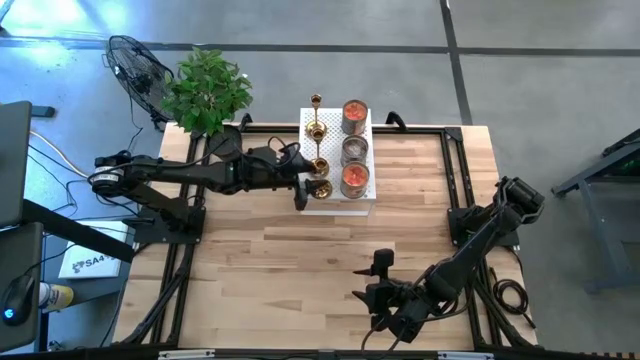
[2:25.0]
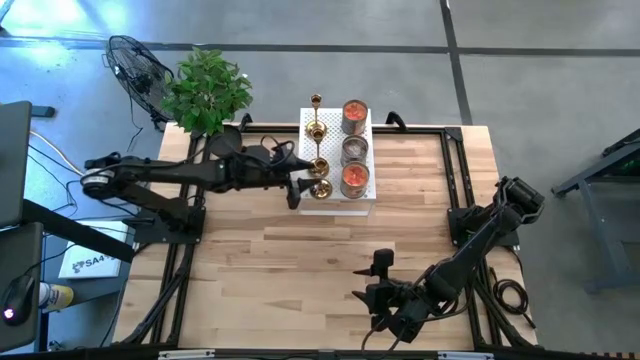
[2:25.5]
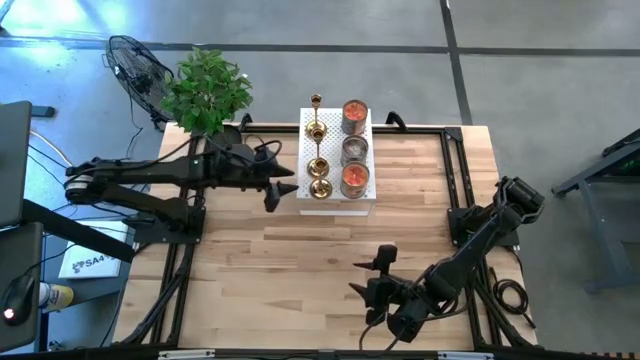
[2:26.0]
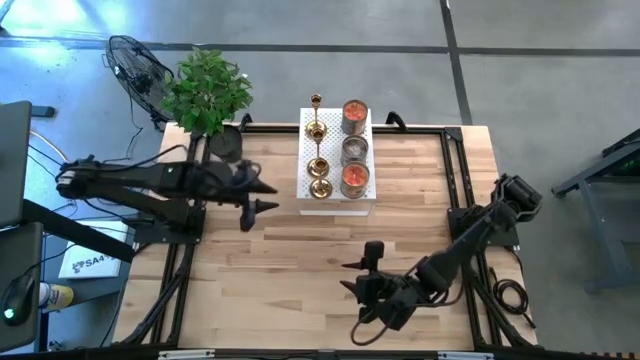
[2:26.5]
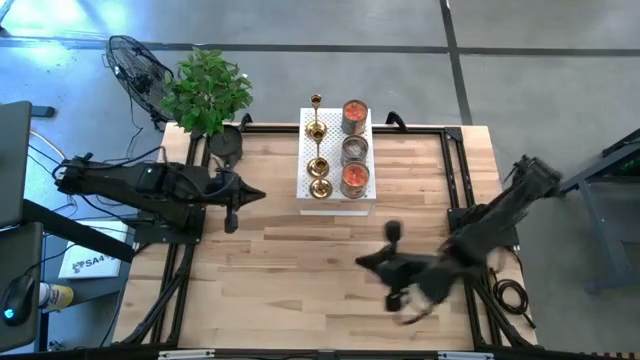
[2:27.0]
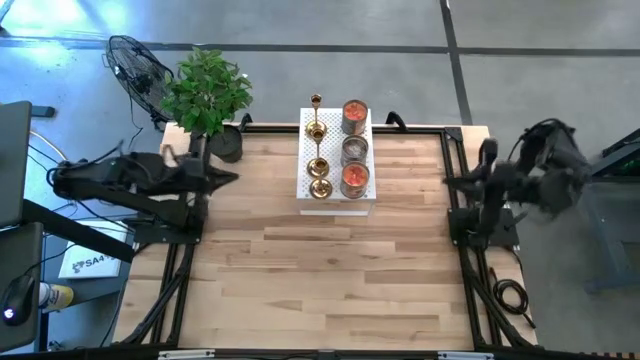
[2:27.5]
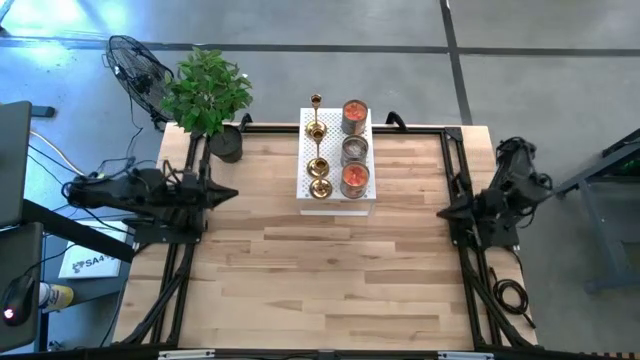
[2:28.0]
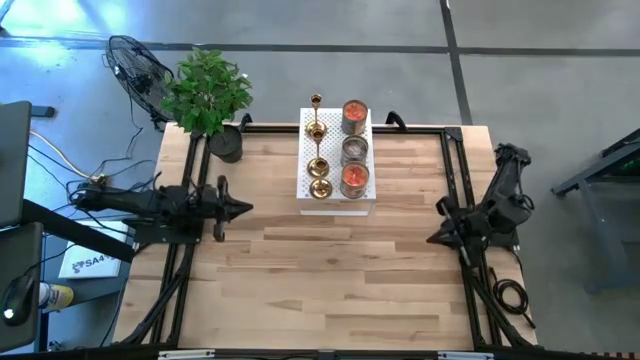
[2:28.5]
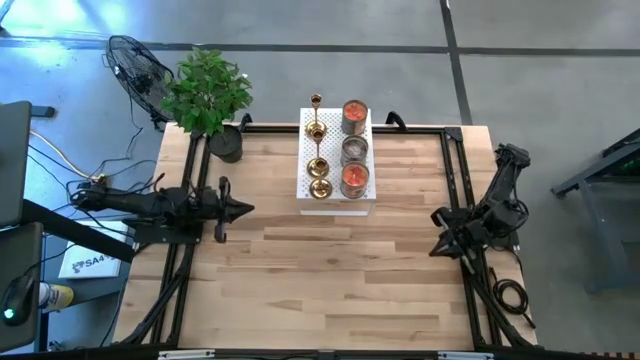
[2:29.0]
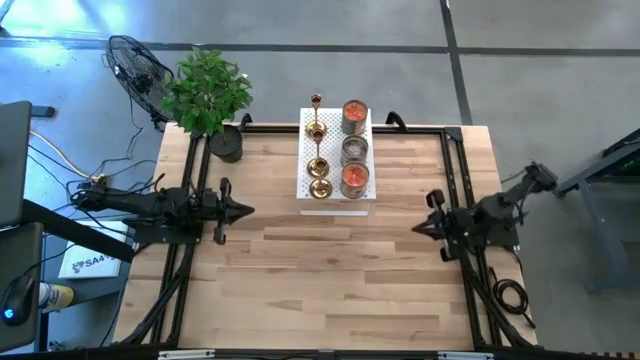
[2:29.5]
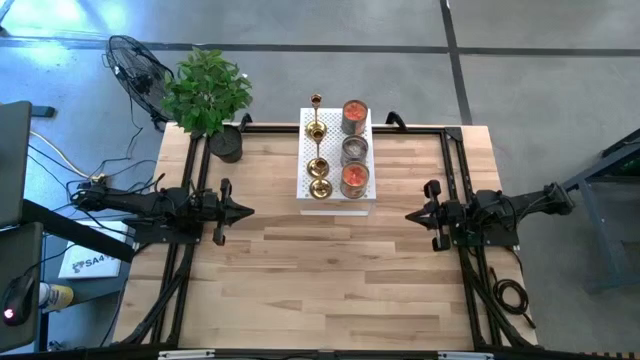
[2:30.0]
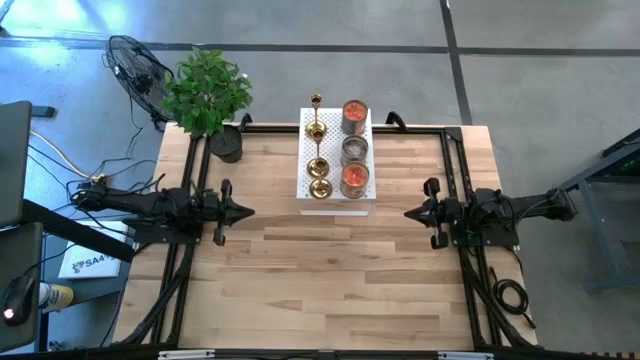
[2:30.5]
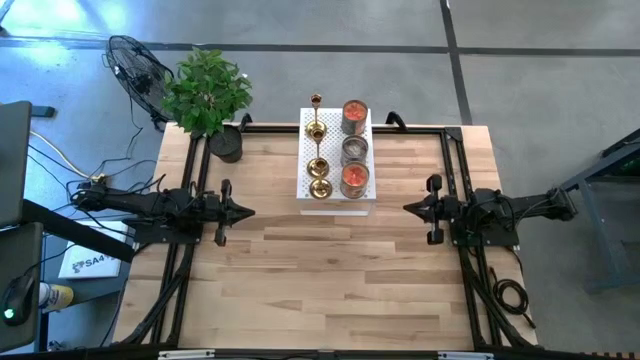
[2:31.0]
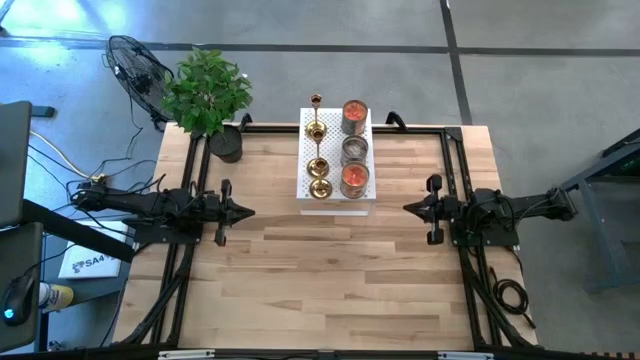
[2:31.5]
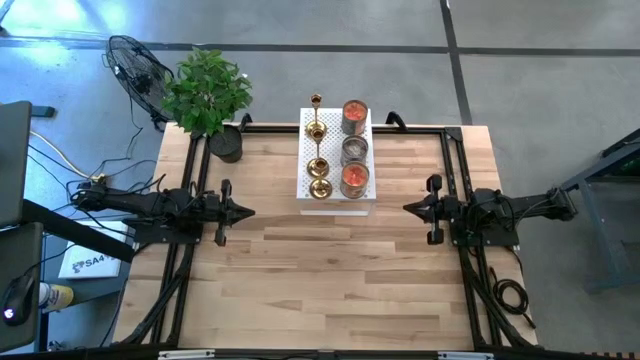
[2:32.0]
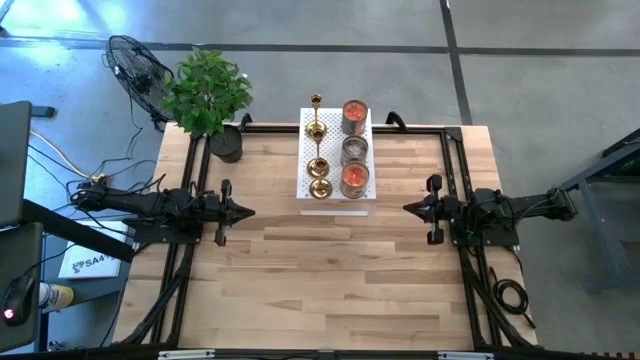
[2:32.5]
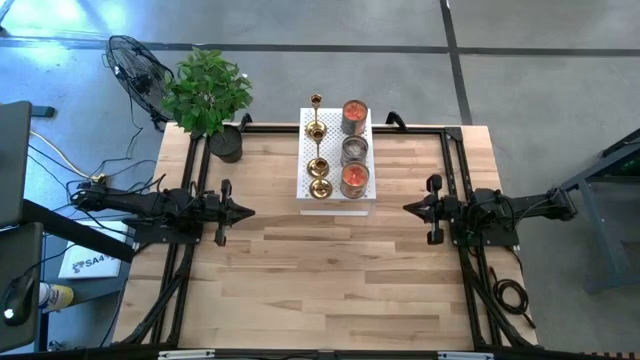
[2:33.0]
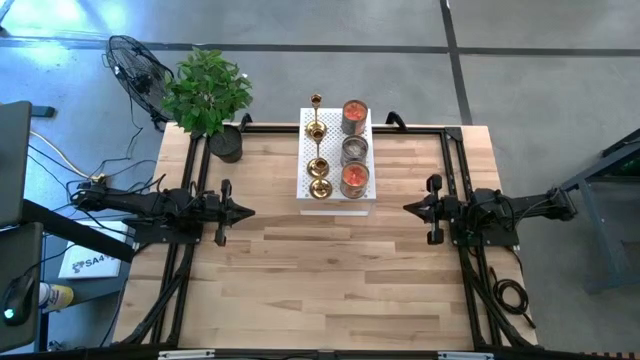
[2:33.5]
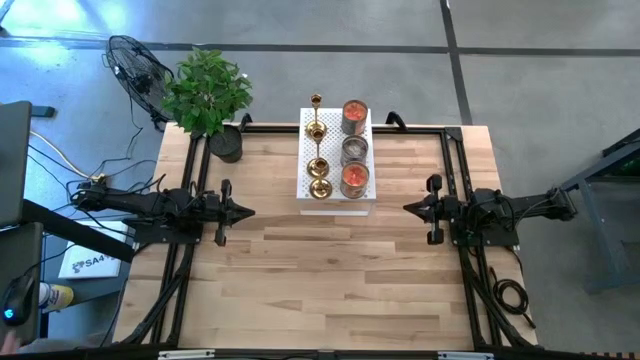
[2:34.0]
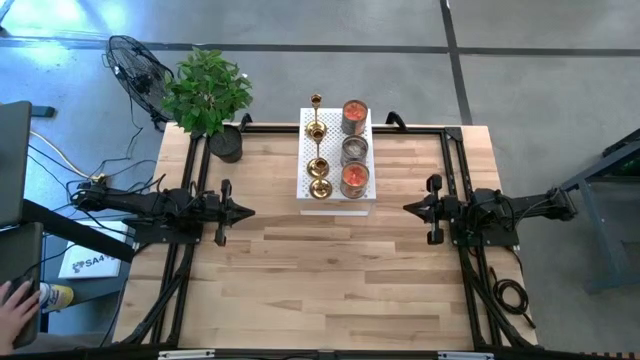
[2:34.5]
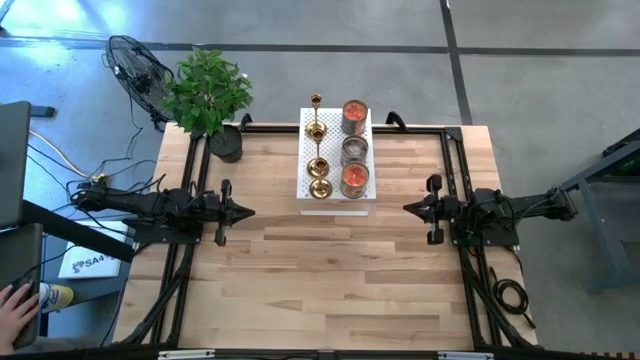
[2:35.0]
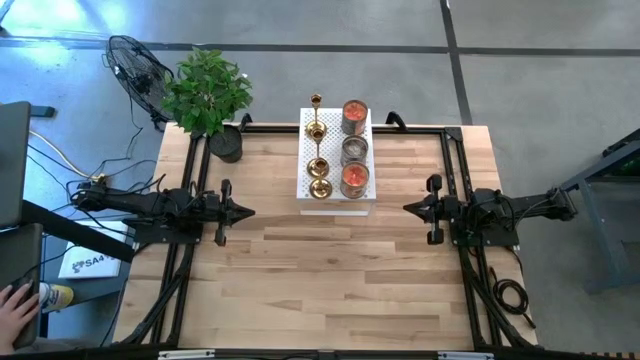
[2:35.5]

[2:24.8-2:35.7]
Task: Pick & Place candle stick holders
Return to Home Position

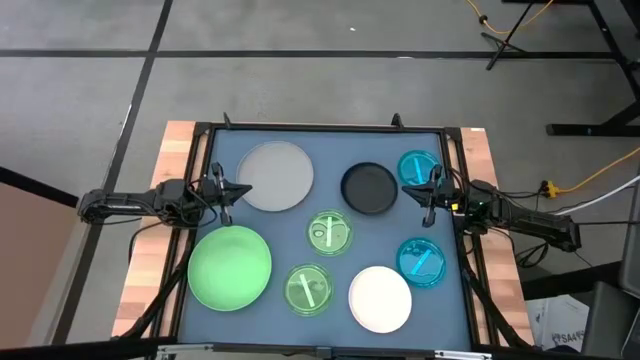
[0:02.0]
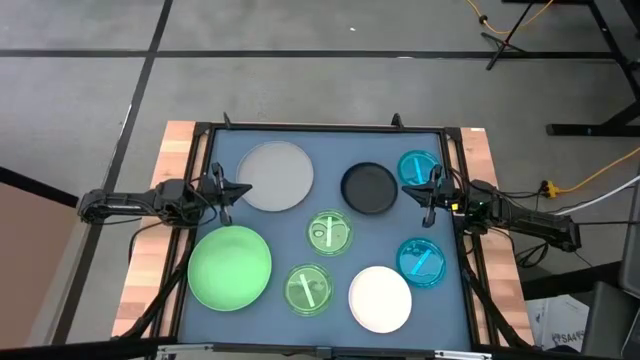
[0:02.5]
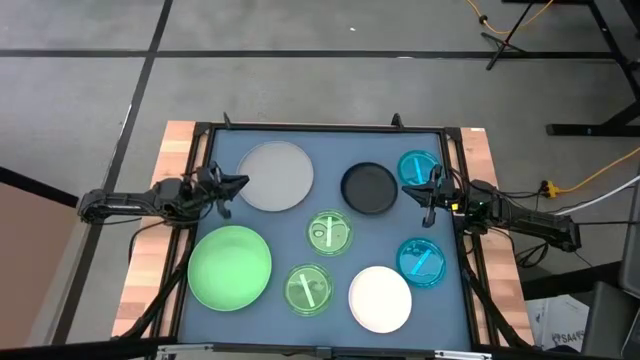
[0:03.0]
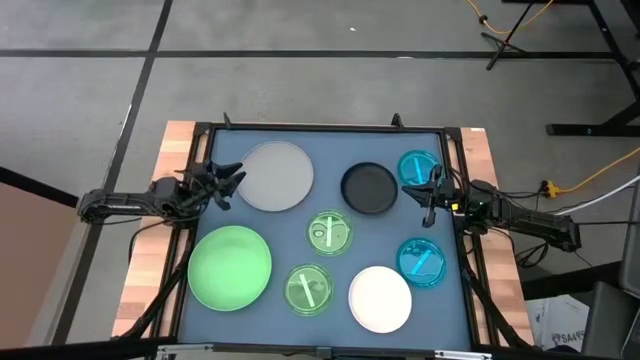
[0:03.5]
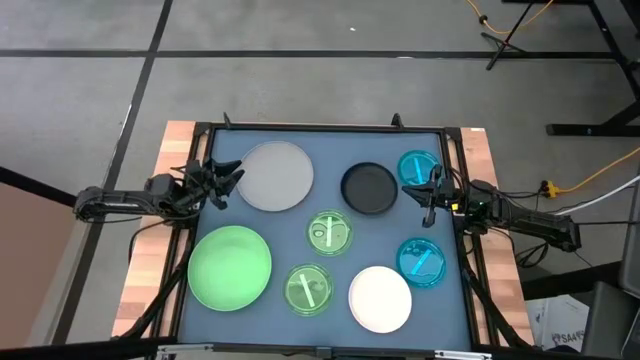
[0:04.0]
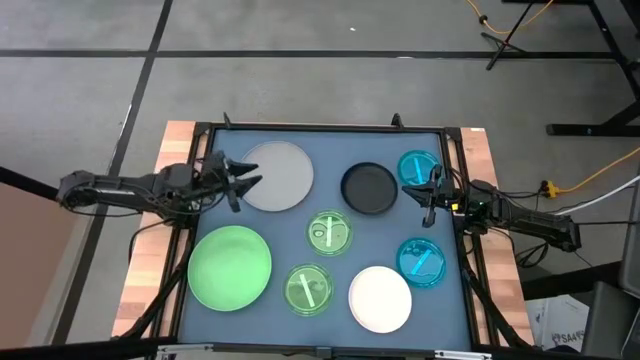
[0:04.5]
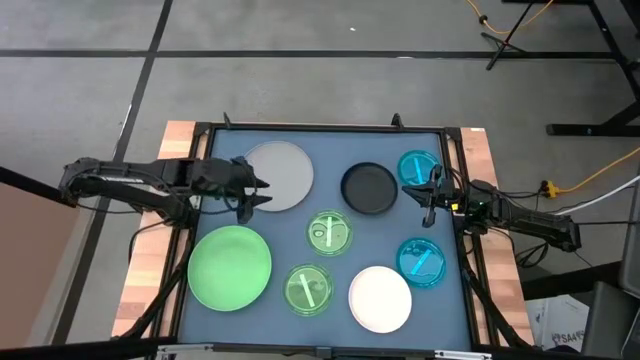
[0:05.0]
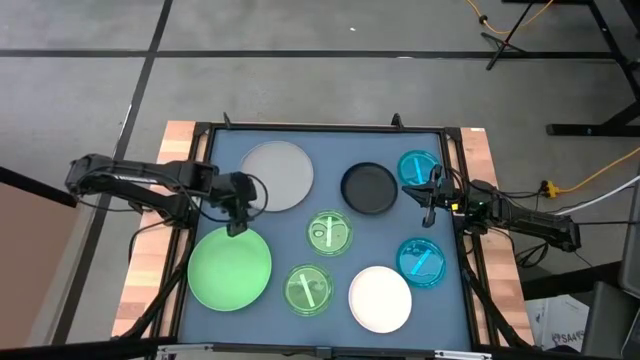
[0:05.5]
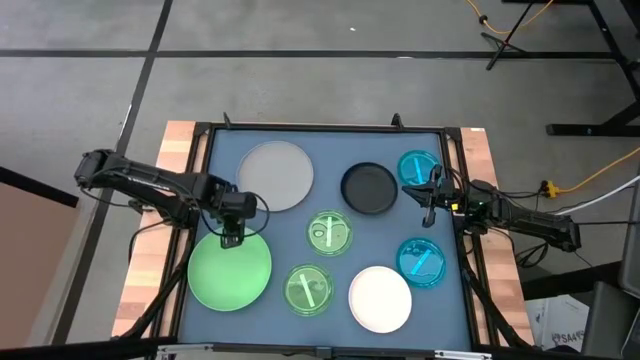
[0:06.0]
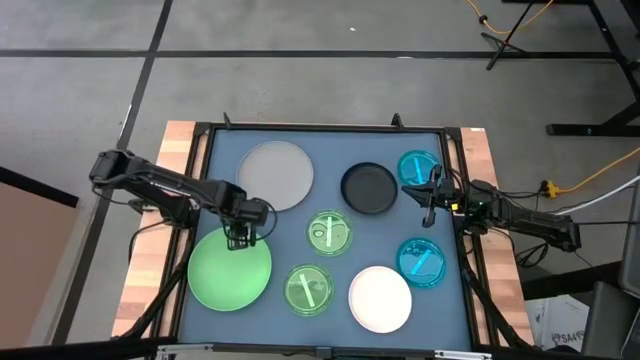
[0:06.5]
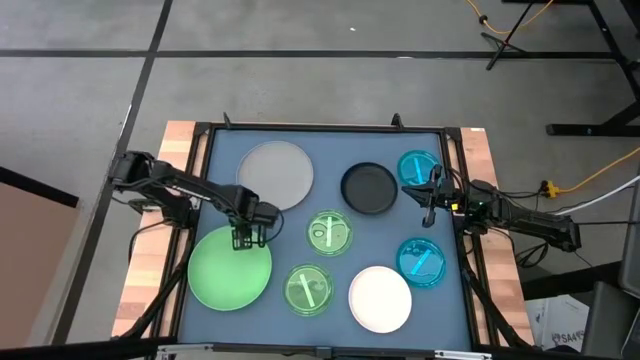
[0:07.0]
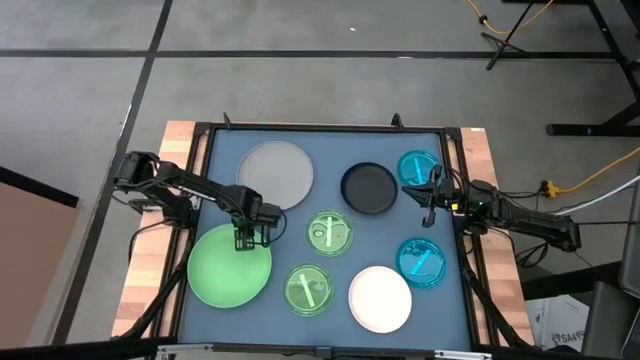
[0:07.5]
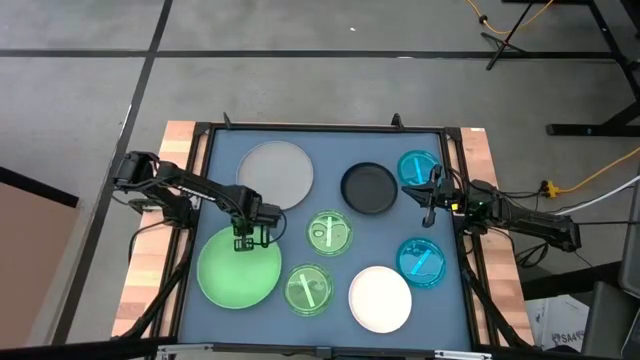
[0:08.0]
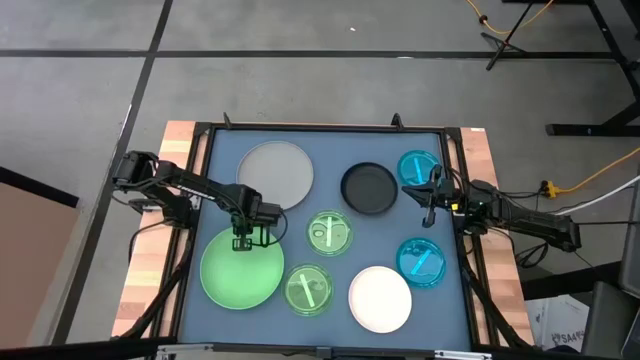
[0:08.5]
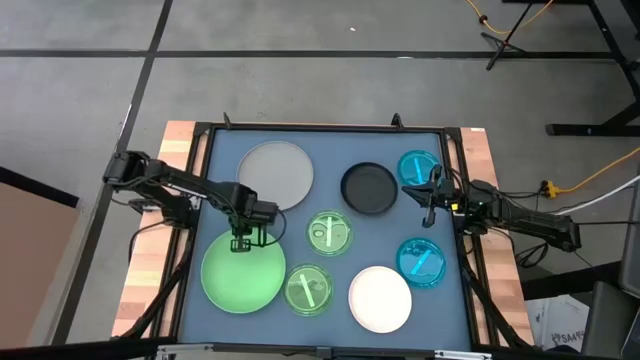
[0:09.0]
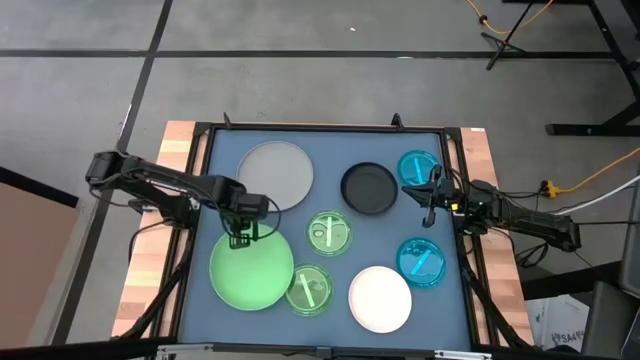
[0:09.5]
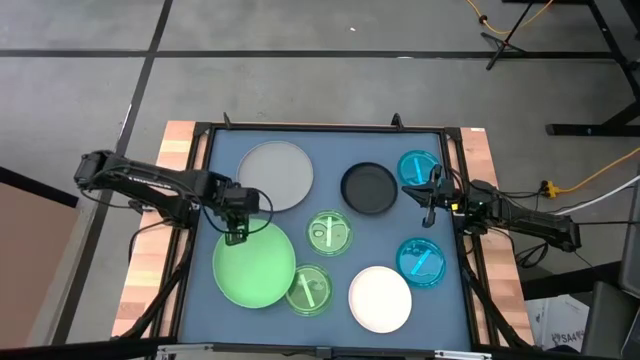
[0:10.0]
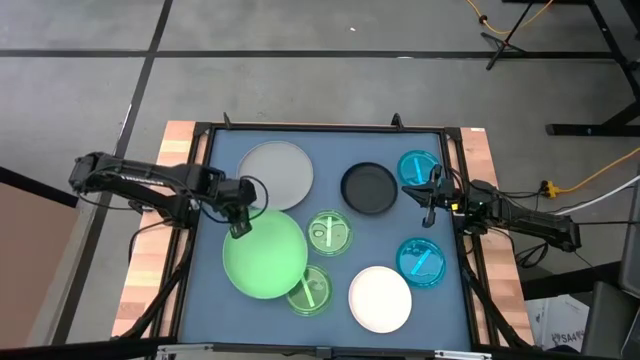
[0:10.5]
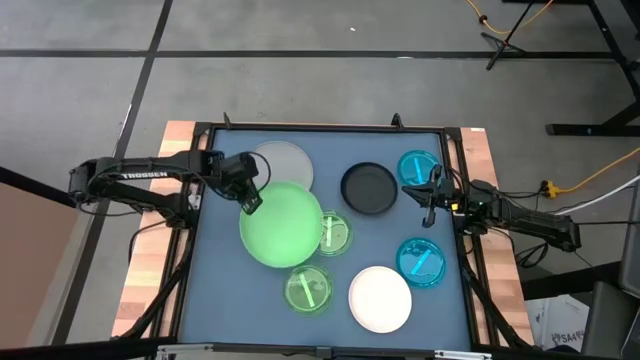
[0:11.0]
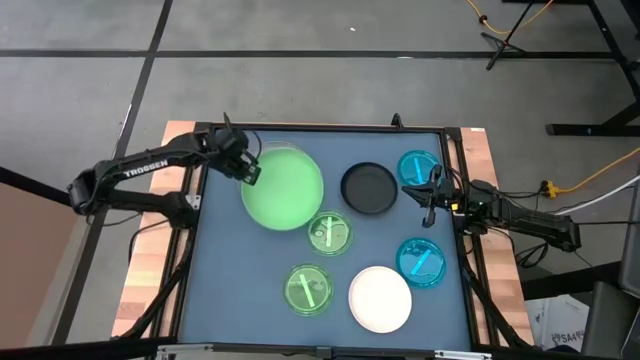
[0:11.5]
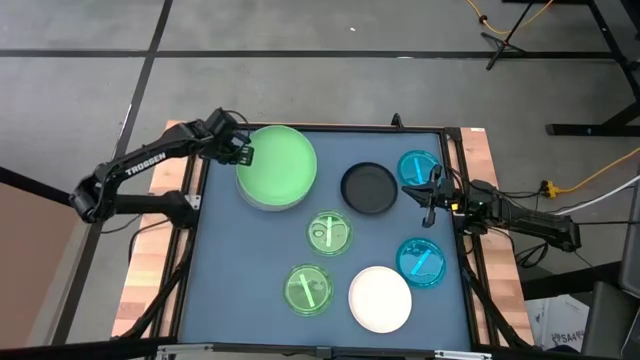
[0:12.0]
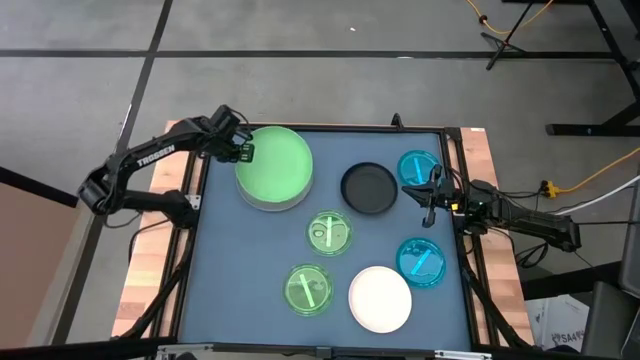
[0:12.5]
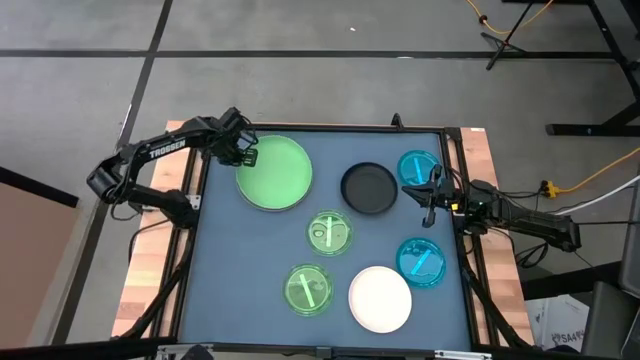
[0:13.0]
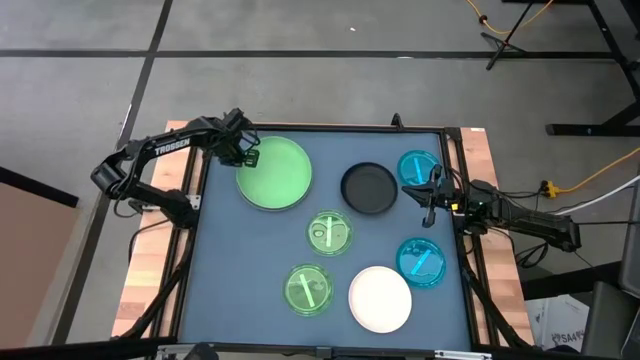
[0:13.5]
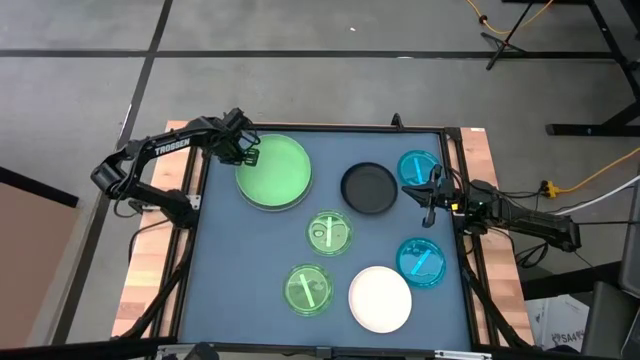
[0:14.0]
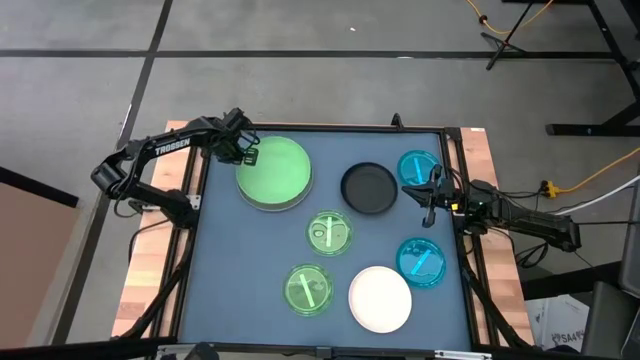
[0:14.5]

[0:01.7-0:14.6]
Task: Stack plastic plates
Stack the green plate on top of the gray plate
